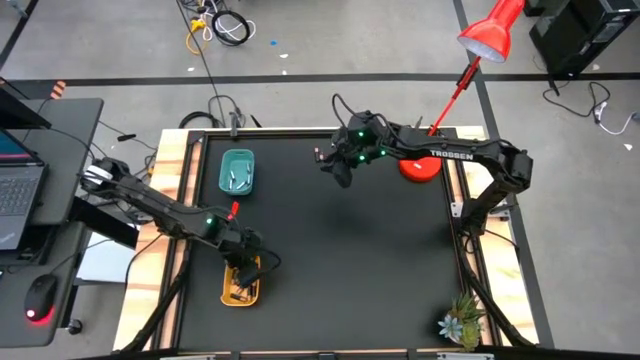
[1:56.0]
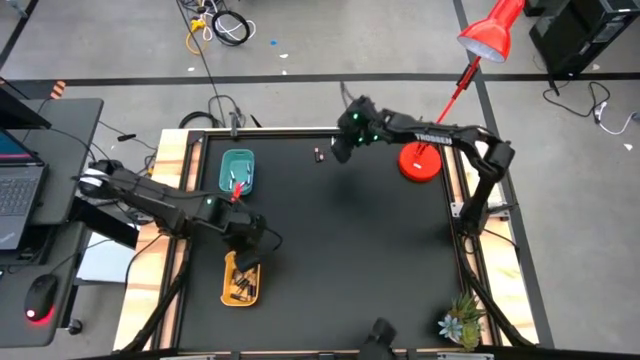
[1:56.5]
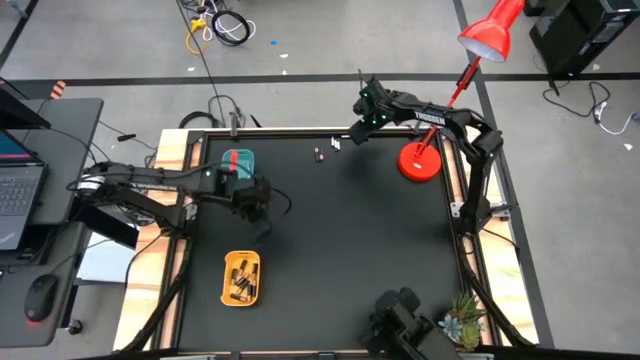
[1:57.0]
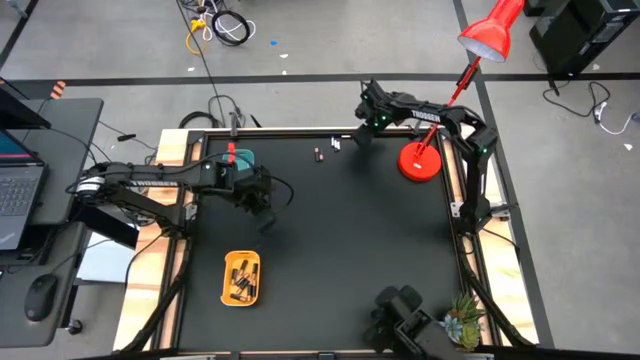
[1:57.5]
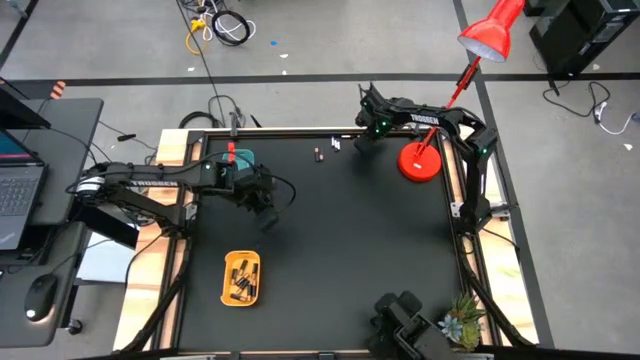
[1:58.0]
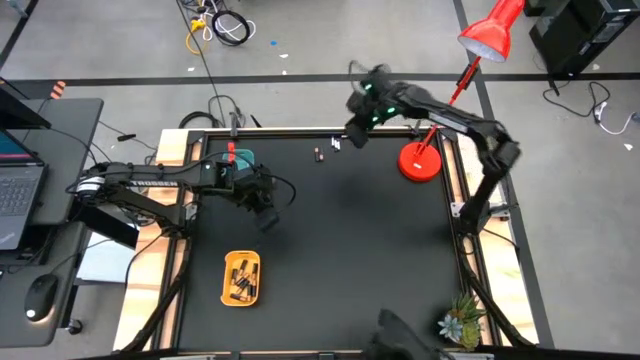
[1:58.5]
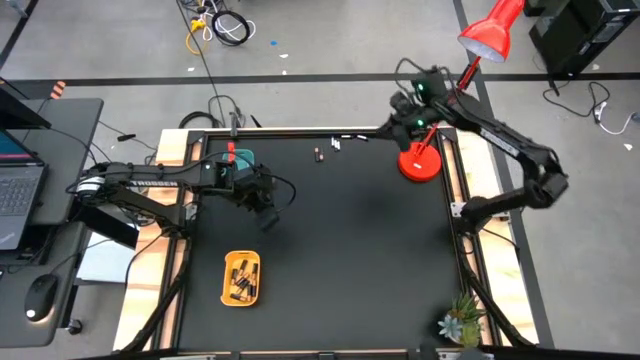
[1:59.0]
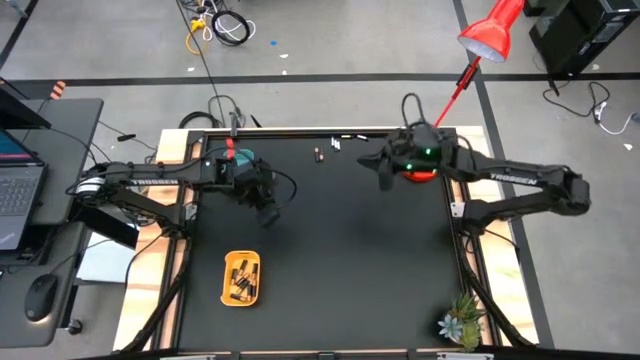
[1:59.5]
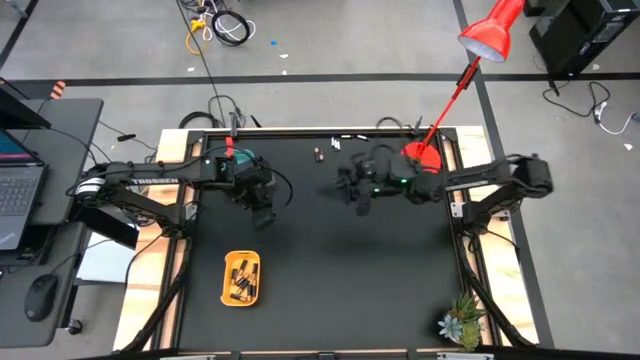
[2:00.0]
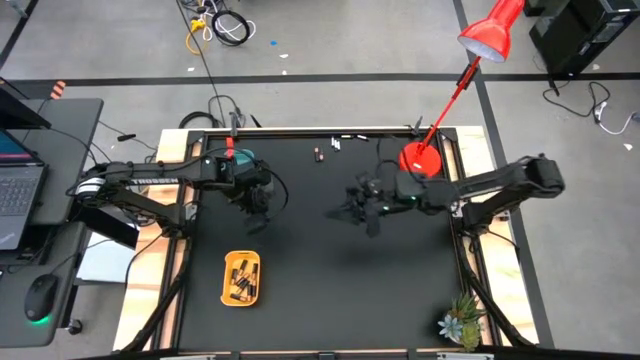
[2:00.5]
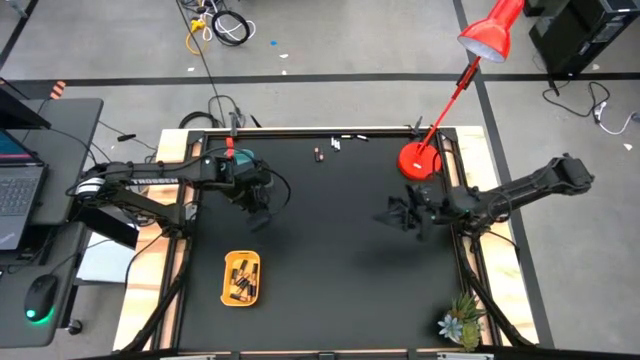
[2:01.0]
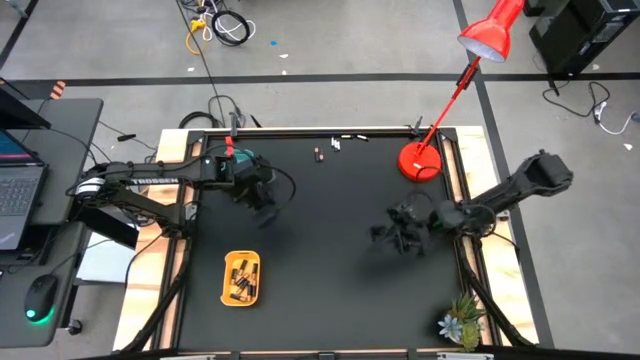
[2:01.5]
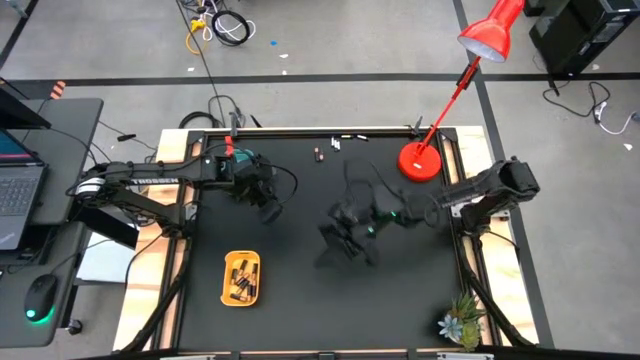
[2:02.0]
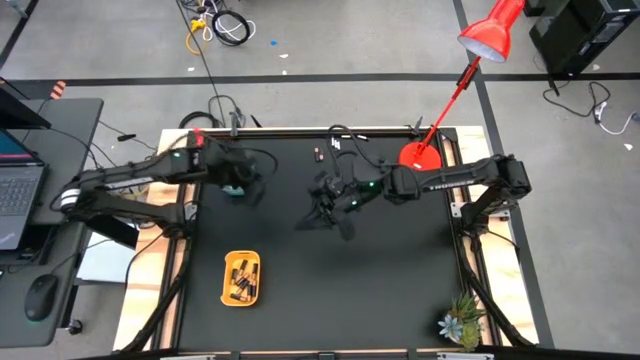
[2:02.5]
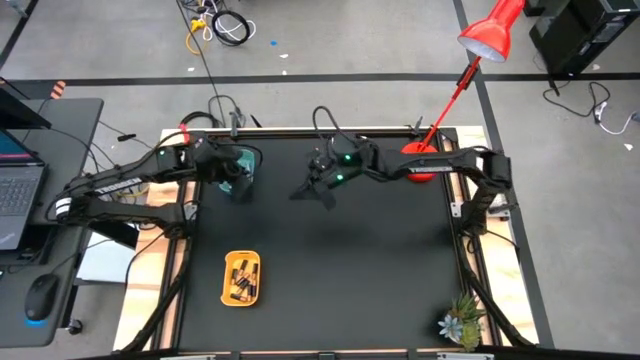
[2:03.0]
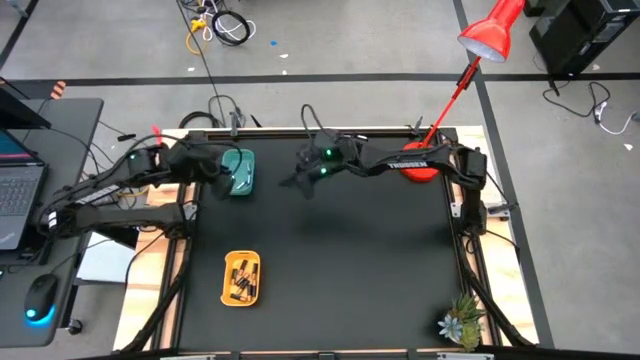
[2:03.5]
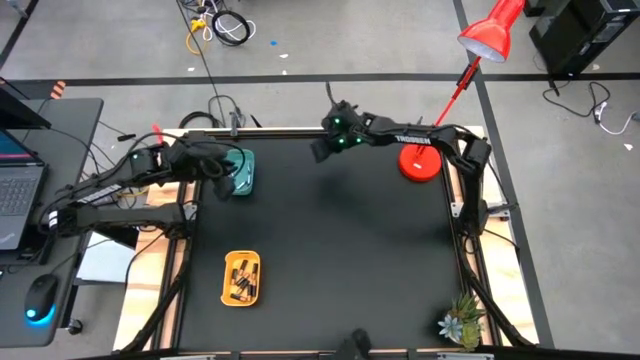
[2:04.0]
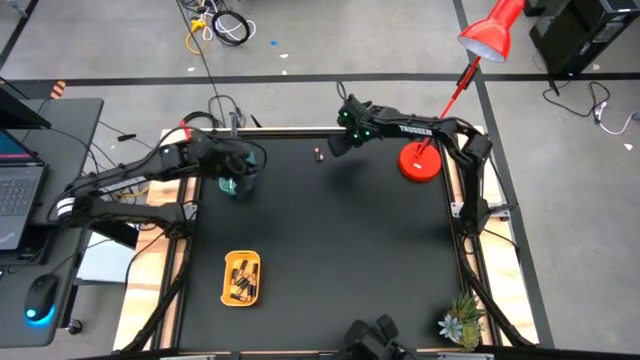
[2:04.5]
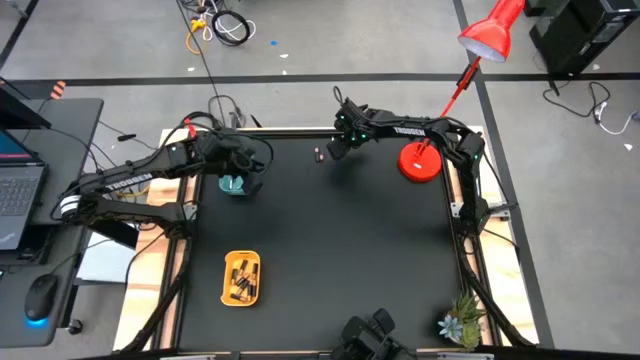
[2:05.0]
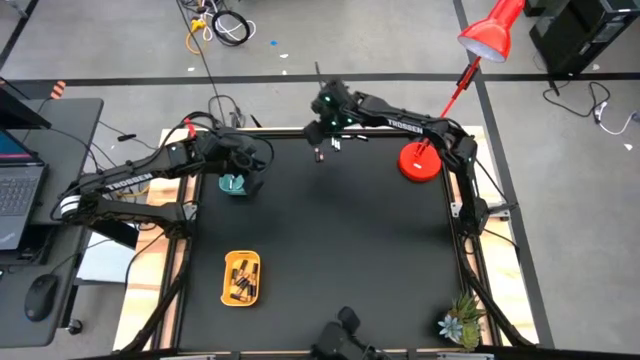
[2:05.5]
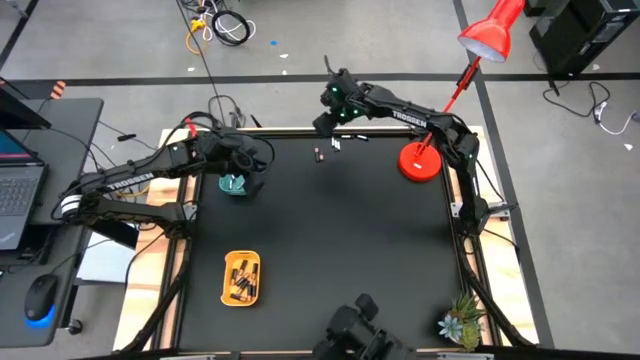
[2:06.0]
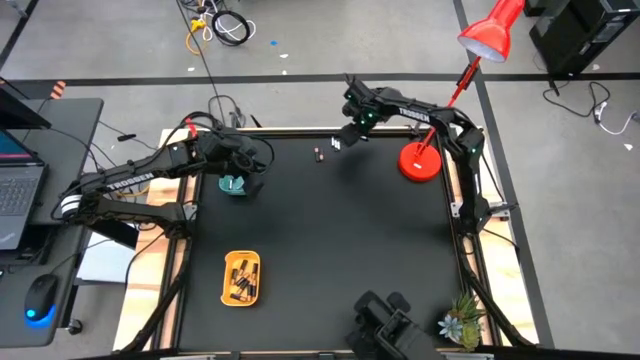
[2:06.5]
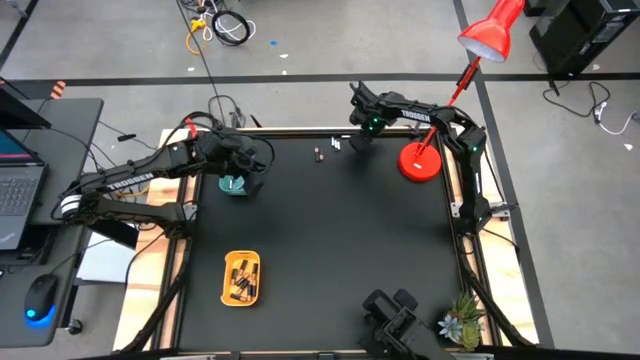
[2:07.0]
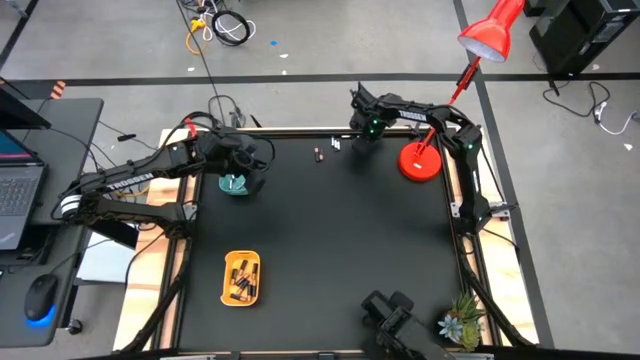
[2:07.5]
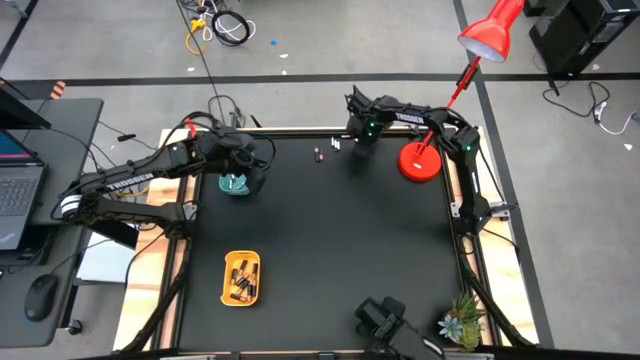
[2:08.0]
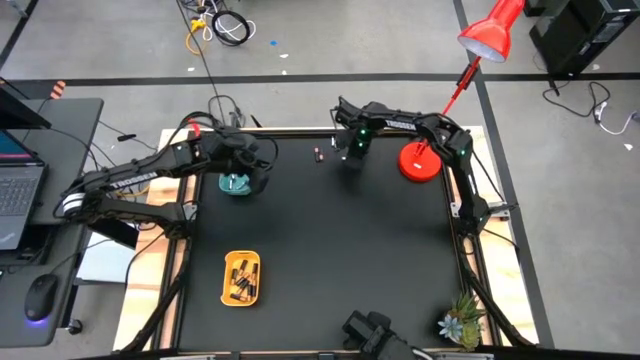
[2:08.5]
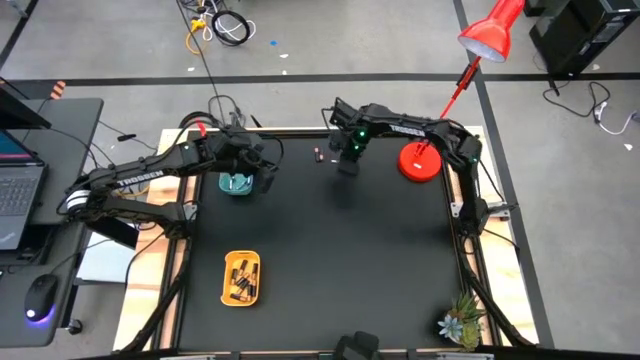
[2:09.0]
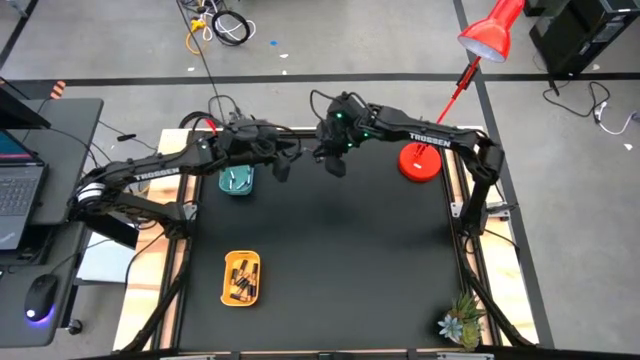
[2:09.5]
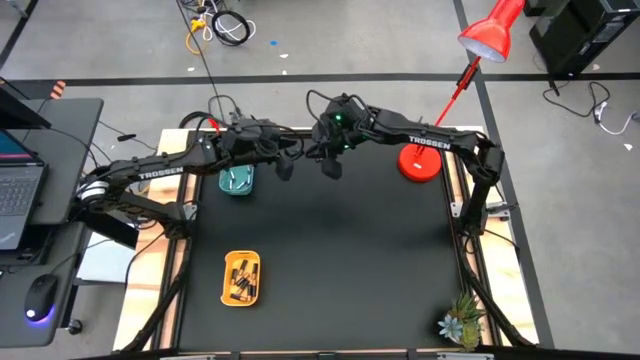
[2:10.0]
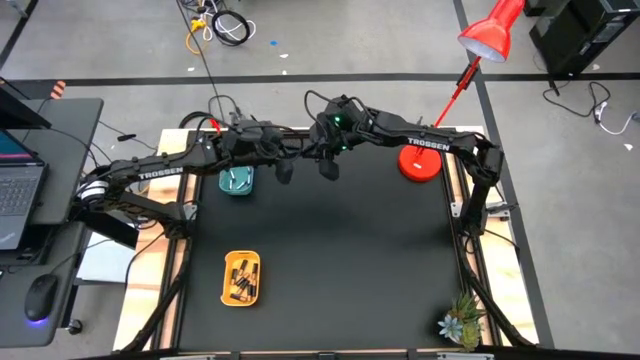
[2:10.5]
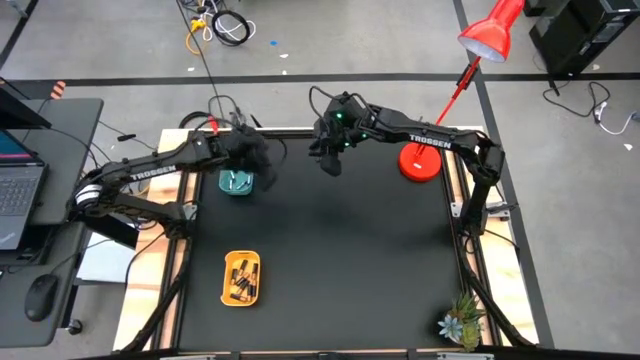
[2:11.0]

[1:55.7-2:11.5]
Task: Sort batteries
Put the white battery into the blue bin

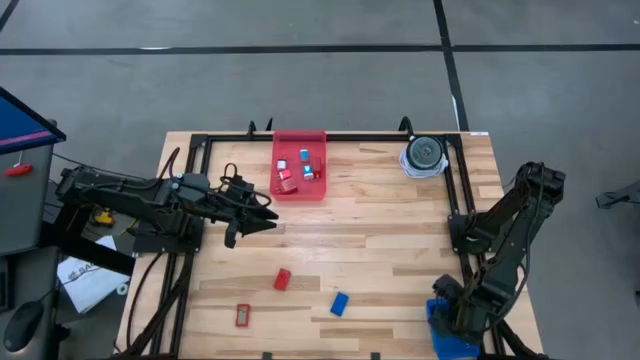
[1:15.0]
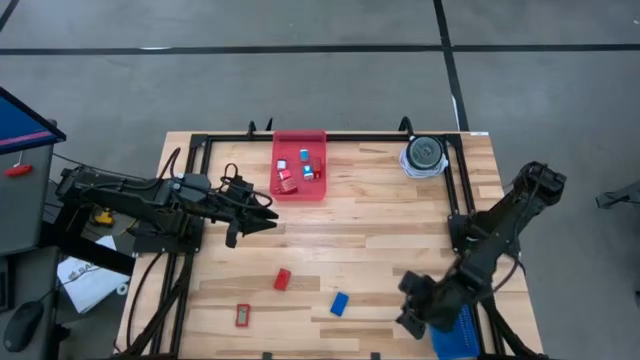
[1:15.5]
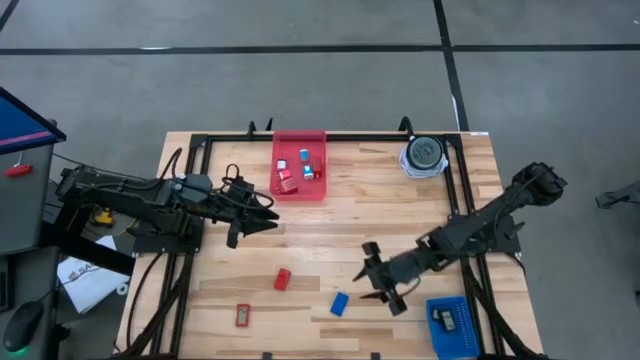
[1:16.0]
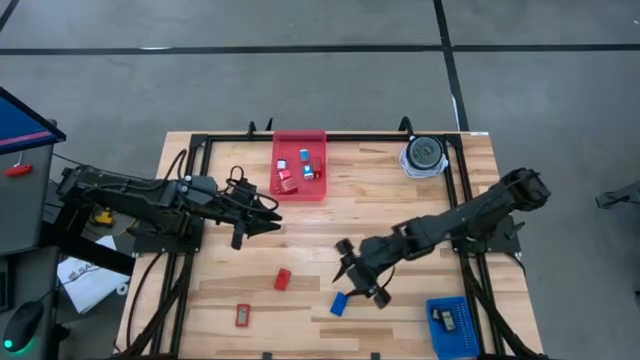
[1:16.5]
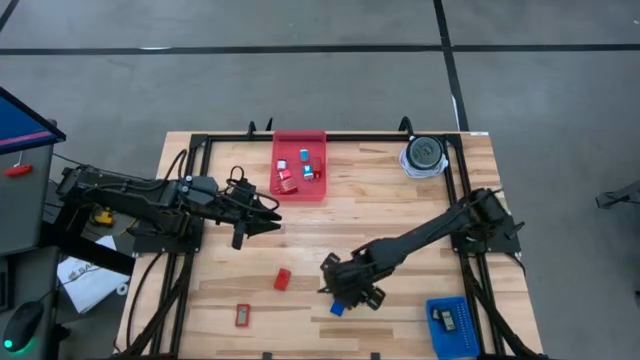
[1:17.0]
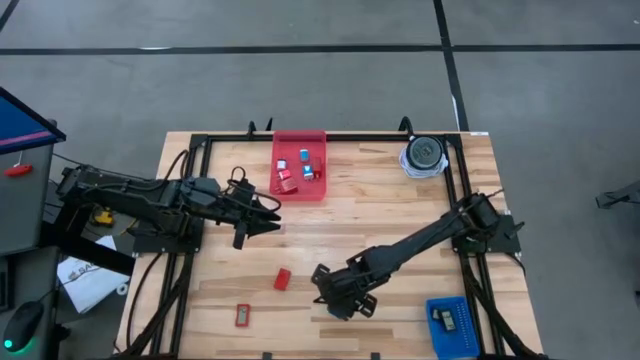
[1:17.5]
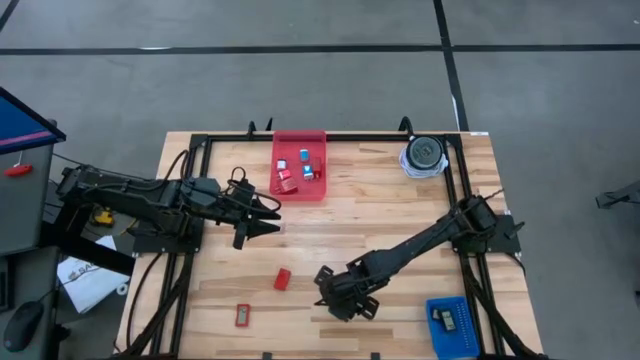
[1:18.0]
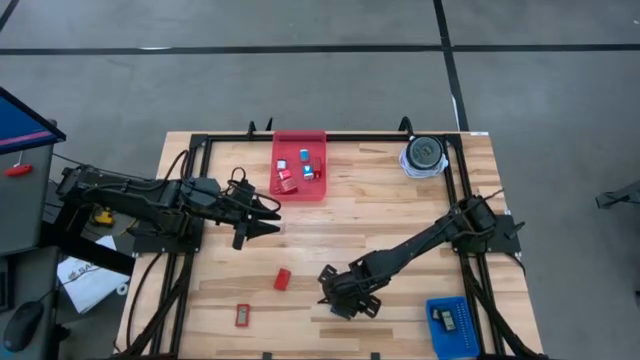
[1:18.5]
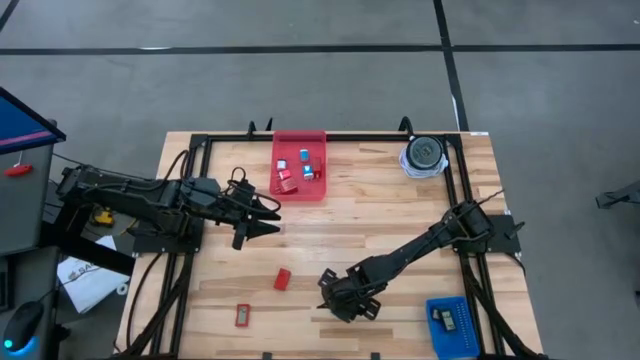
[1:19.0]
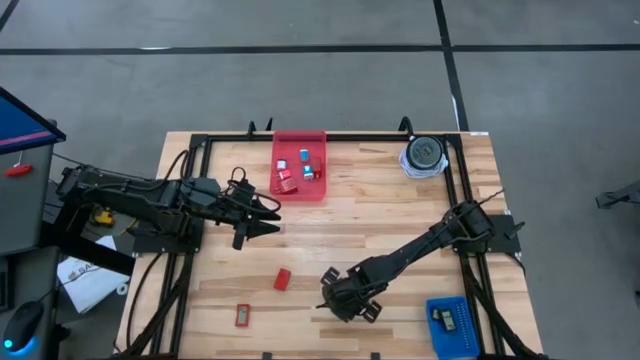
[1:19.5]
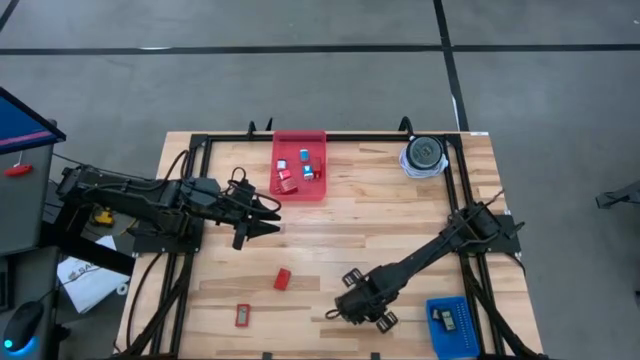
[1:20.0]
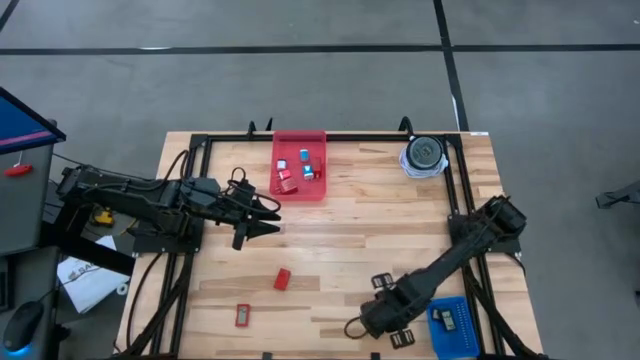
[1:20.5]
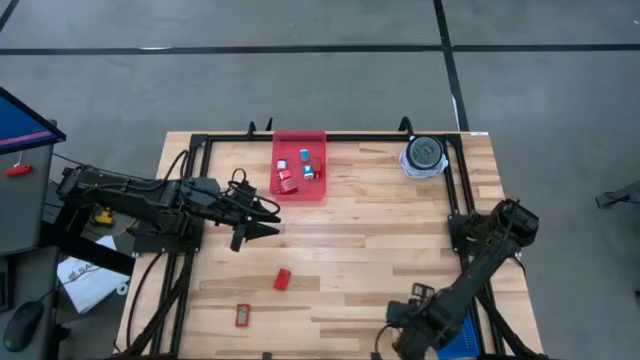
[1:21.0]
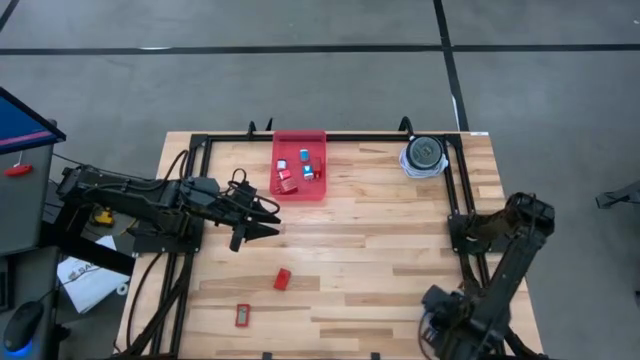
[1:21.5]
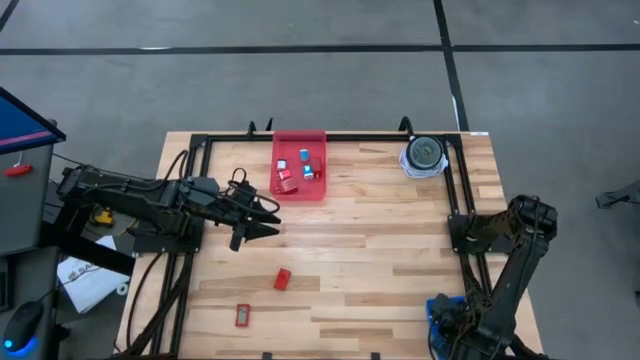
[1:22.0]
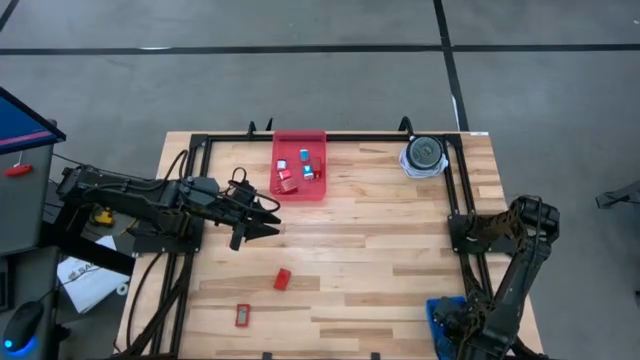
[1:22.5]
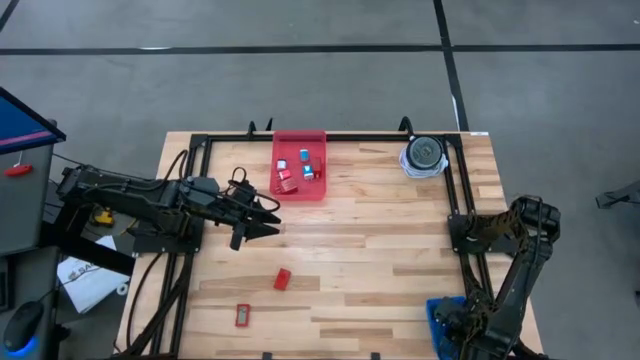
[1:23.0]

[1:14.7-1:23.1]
Task: Pick & Place Office items
Put the blue digital timer into the blue bin
